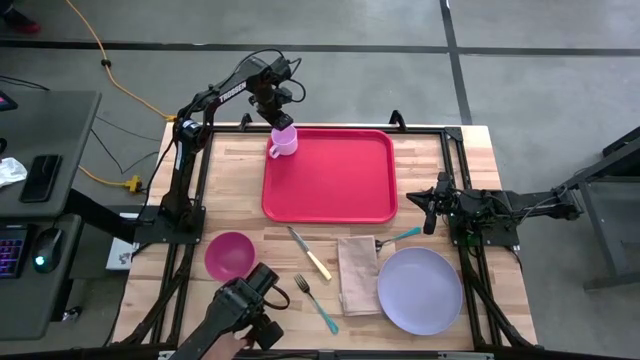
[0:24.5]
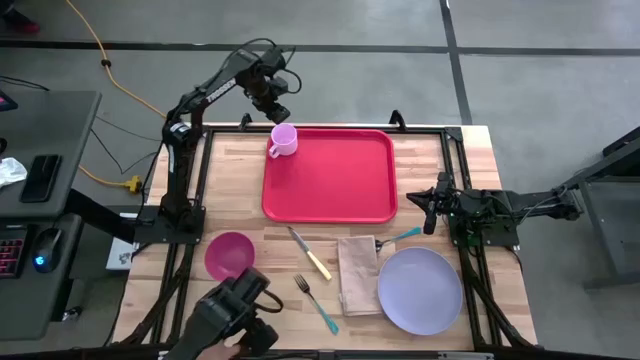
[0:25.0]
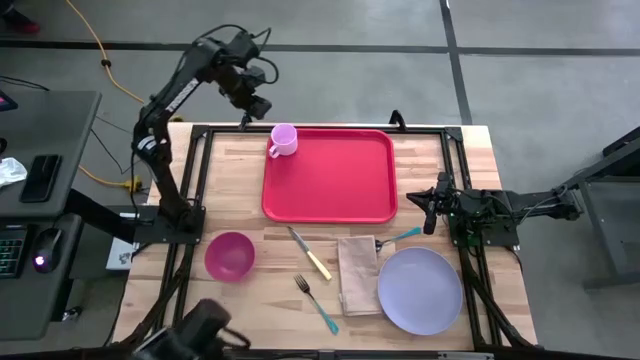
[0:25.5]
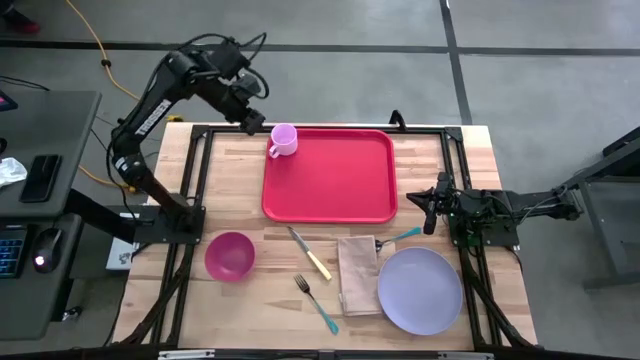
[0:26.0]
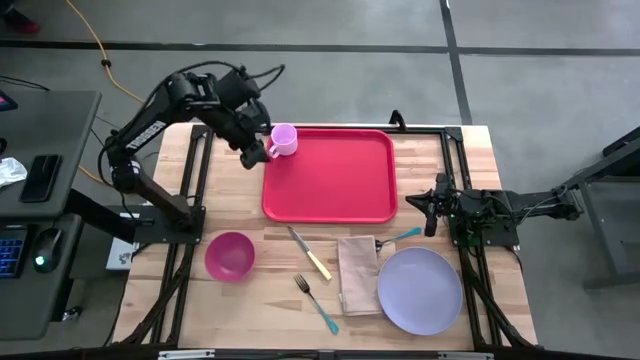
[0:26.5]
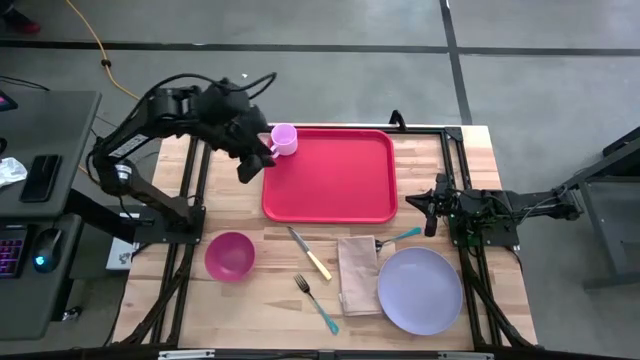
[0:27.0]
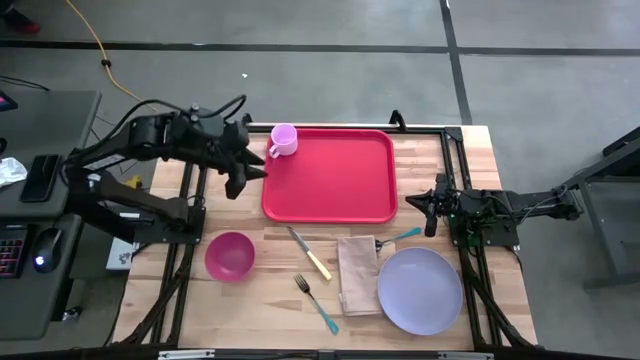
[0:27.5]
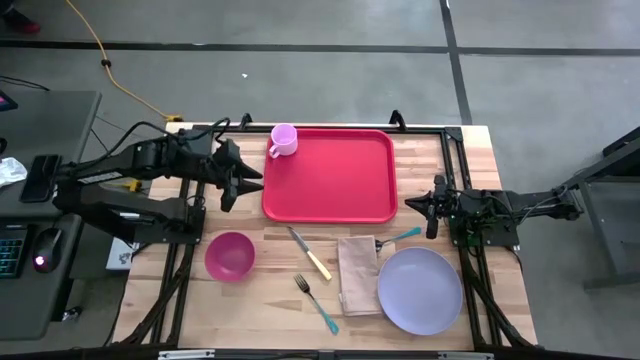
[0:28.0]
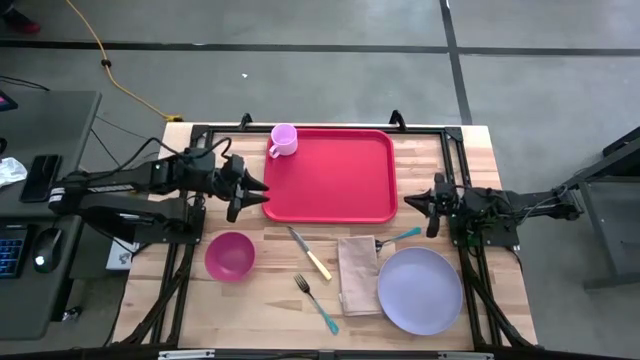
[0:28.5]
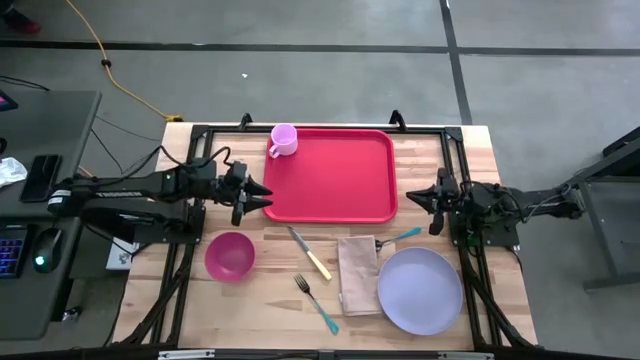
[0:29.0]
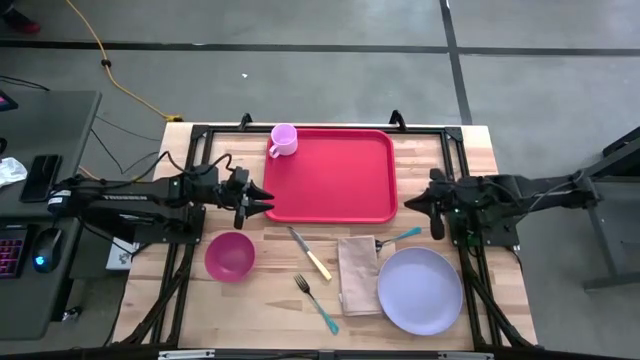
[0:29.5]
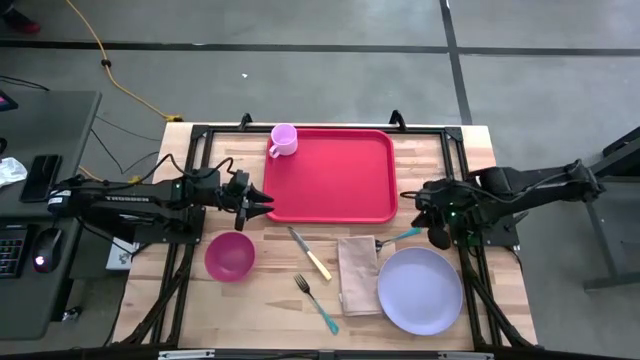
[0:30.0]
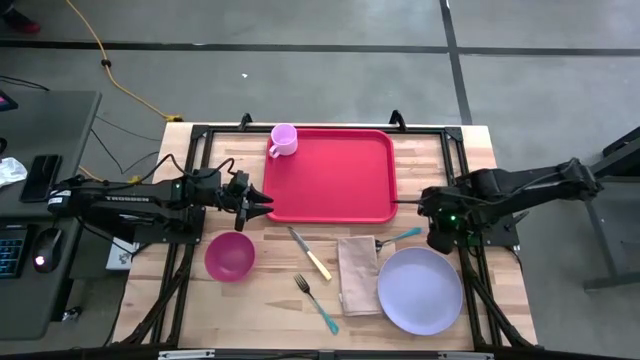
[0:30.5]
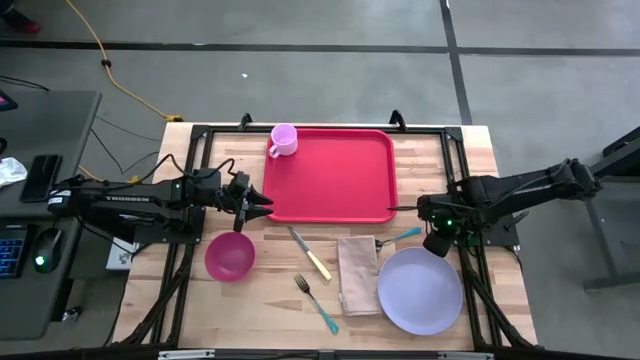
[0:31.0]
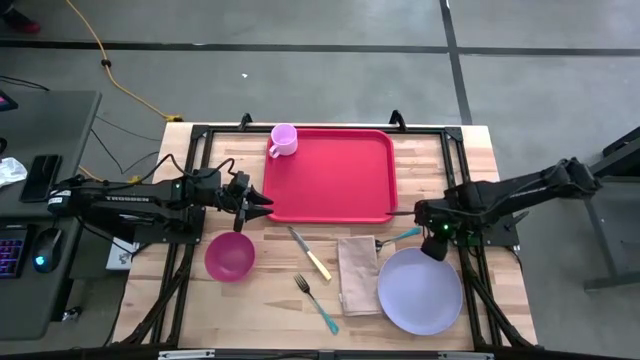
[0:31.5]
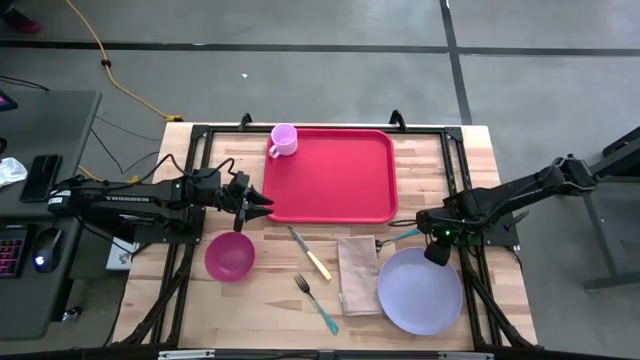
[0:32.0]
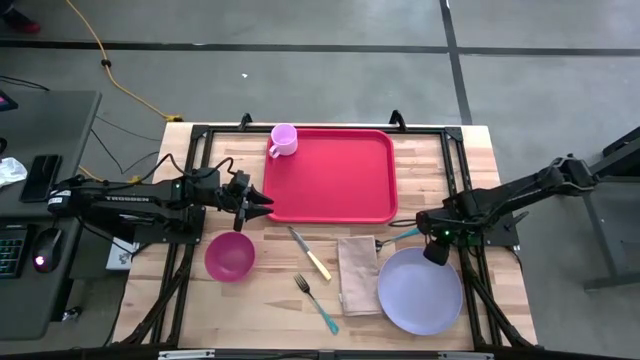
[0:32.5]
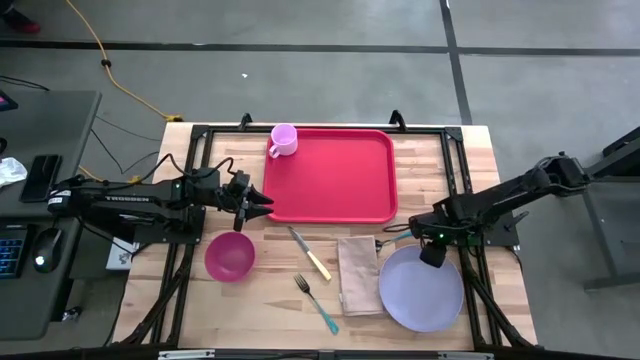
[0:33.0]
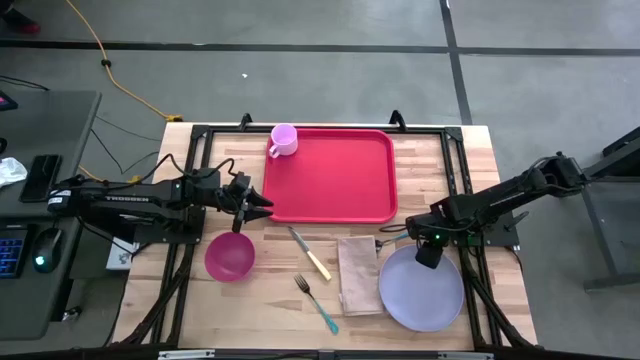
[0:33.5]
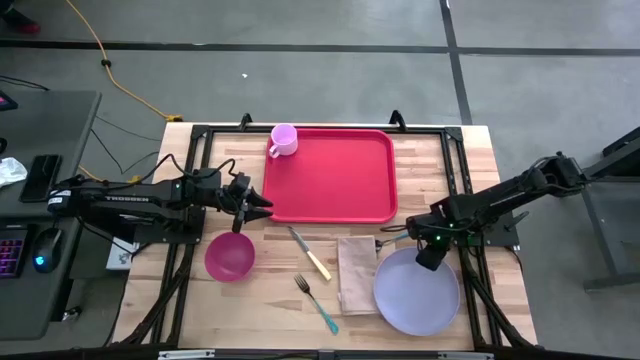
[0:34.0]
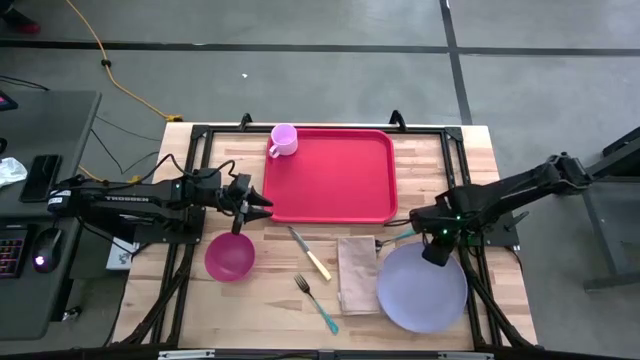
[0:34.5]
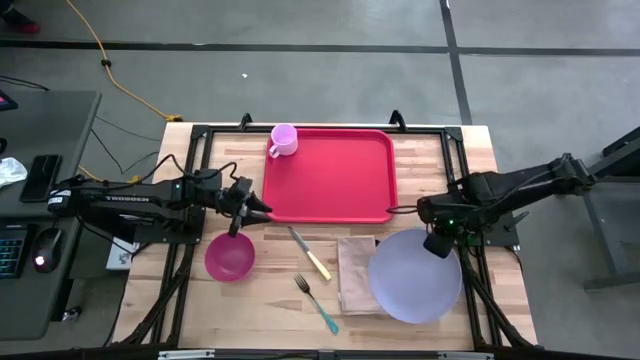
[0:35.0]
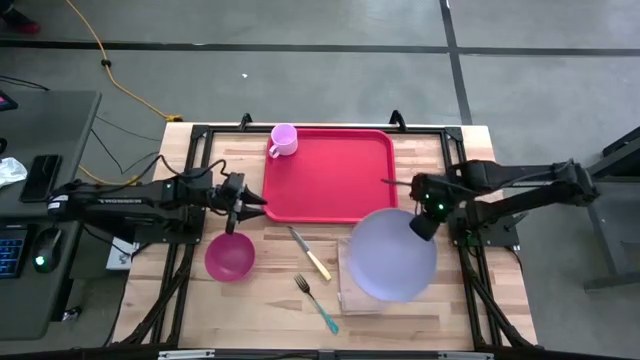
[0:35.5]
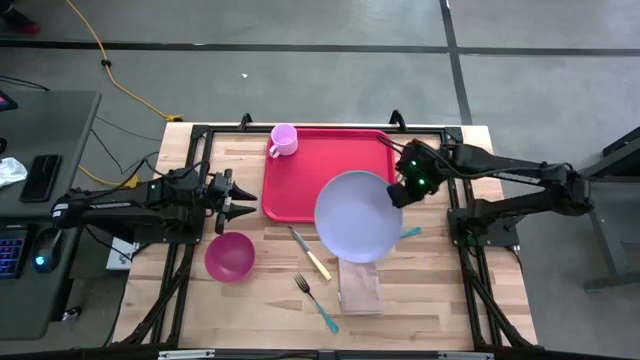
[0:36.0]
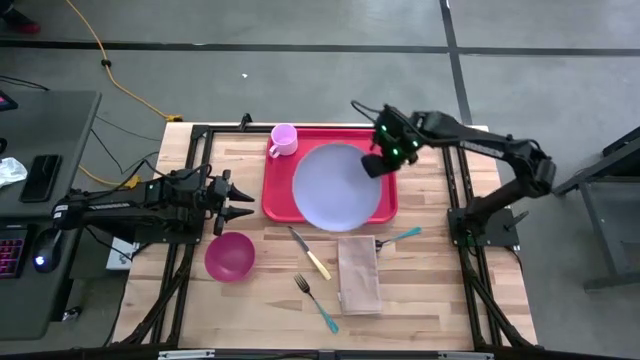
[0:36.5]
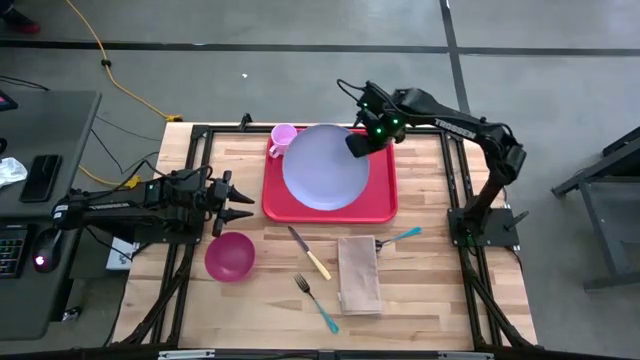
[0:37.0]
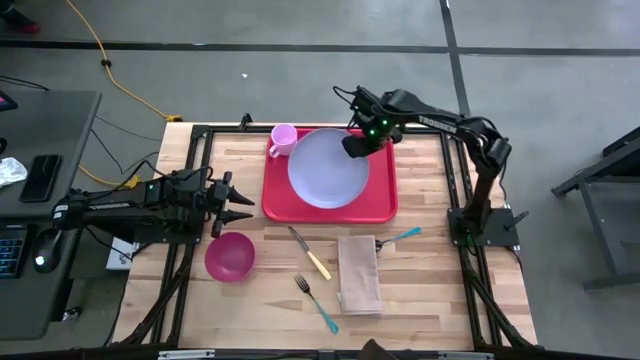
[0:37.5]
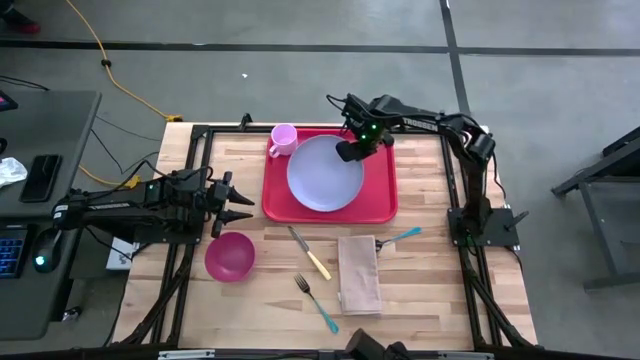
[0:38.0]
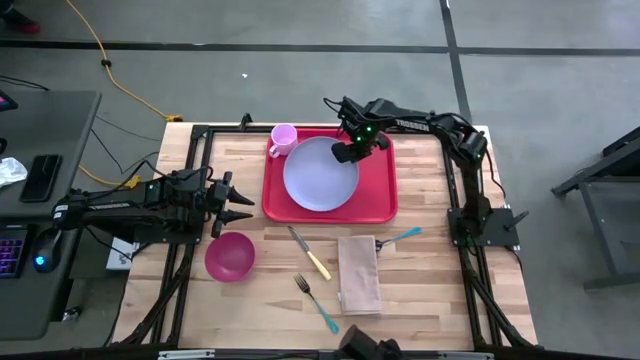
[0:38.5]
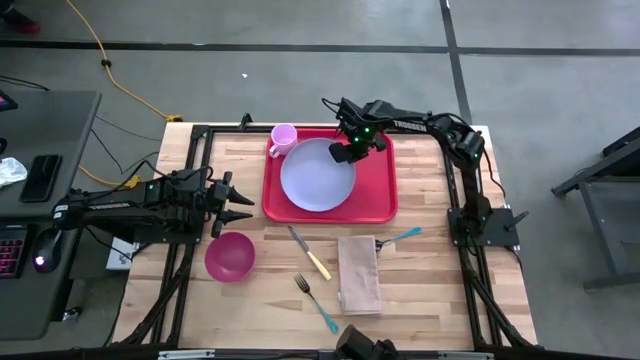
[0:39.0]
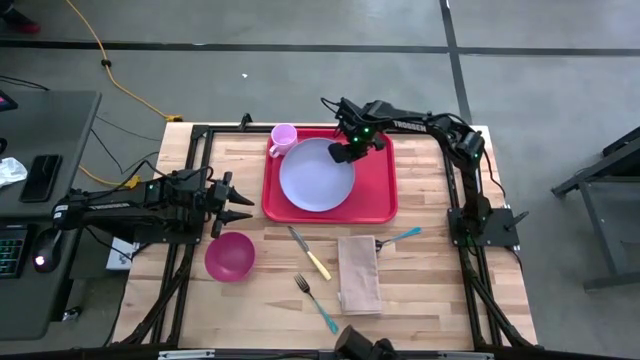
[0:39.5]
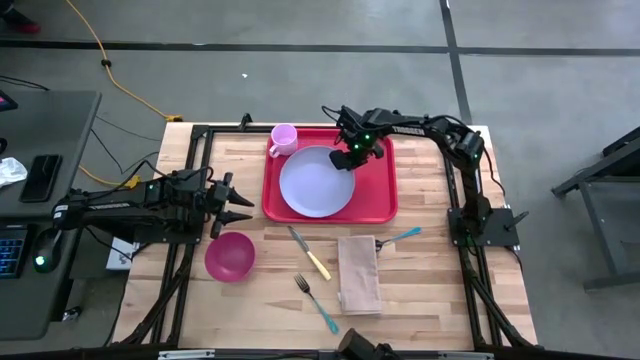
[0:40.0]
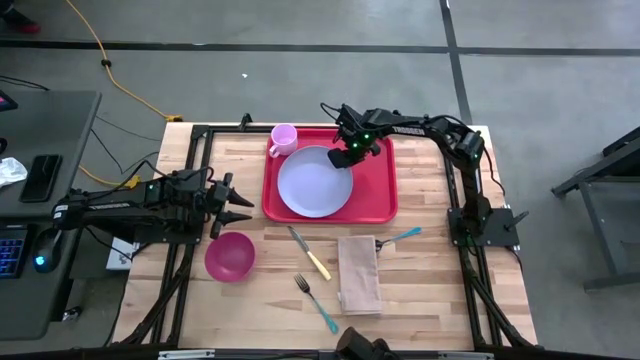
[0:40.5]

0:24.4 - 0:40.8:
Task: Set up tray
Put the light blue plate on the bottom left of the orange serving tray

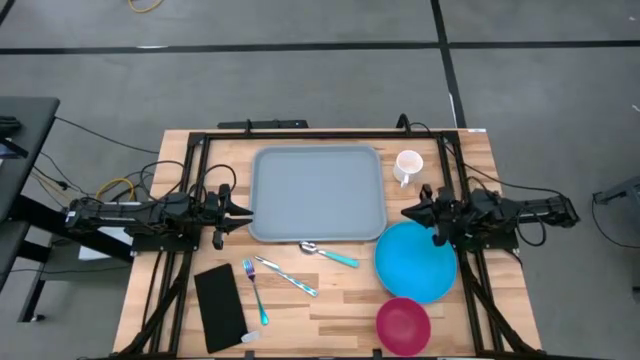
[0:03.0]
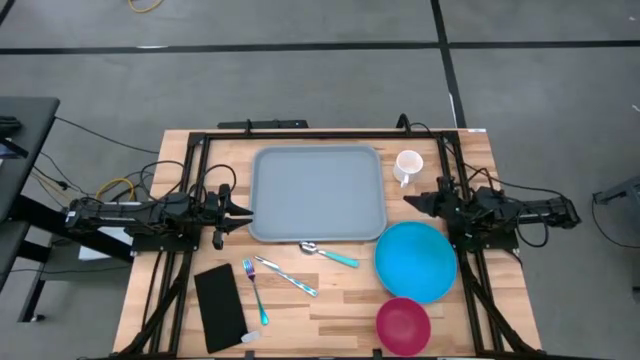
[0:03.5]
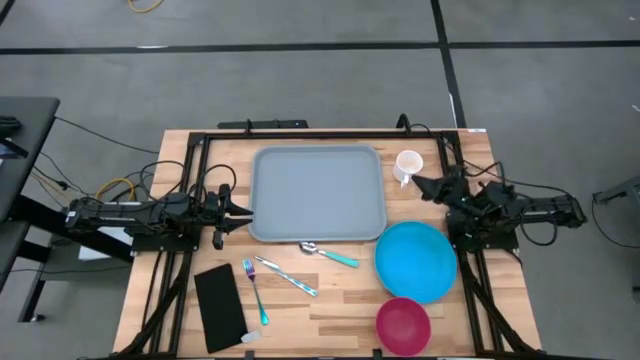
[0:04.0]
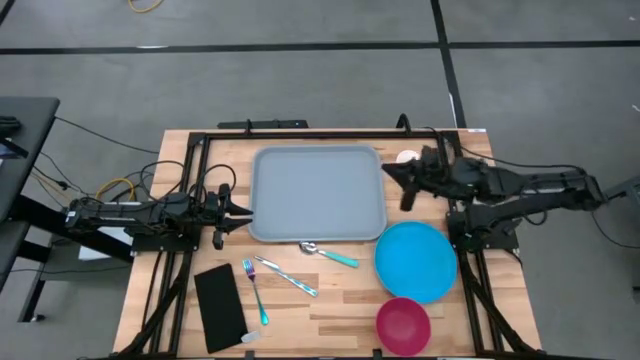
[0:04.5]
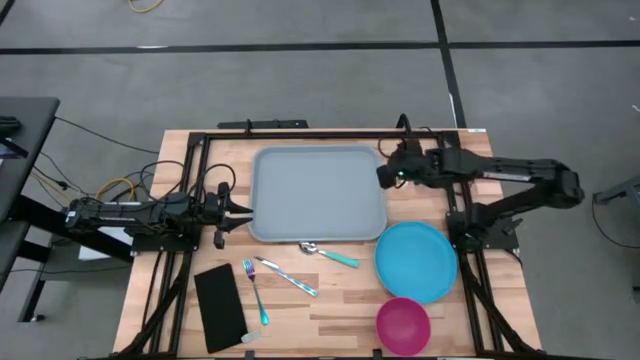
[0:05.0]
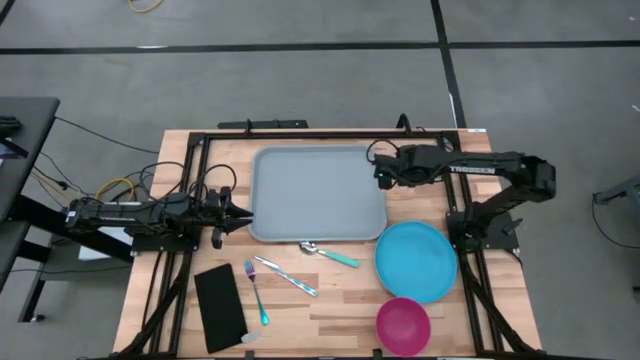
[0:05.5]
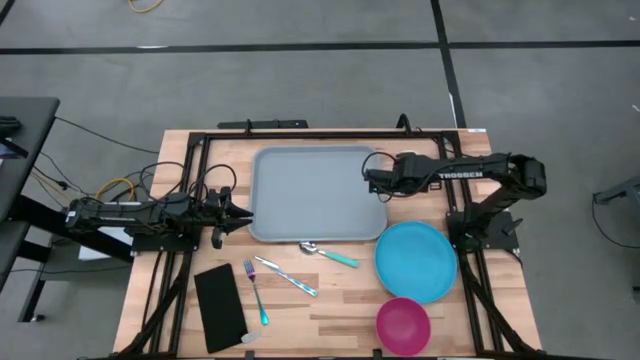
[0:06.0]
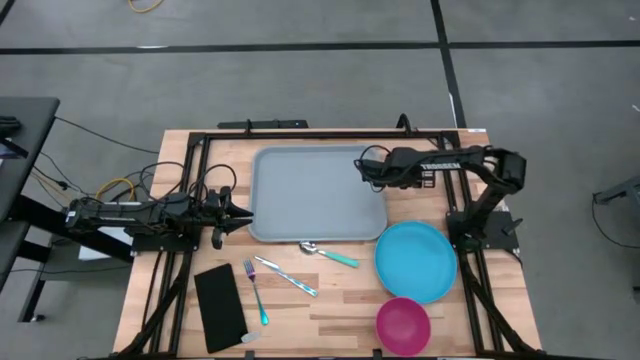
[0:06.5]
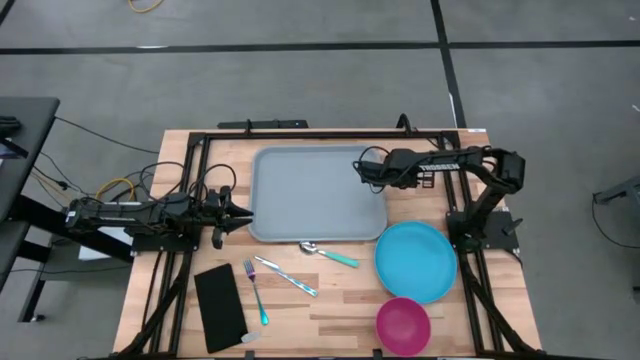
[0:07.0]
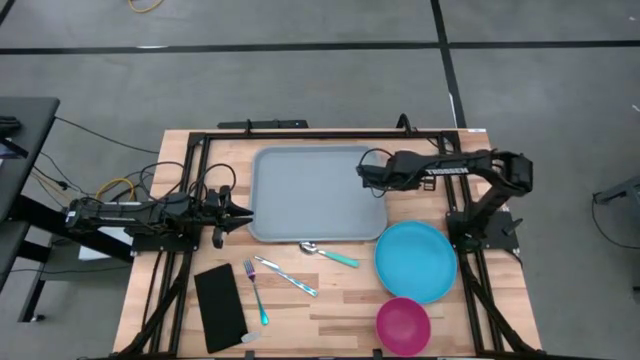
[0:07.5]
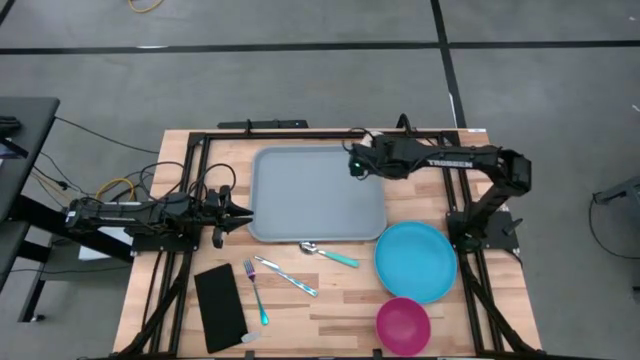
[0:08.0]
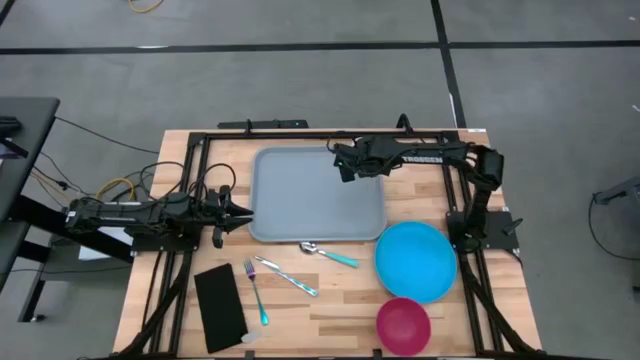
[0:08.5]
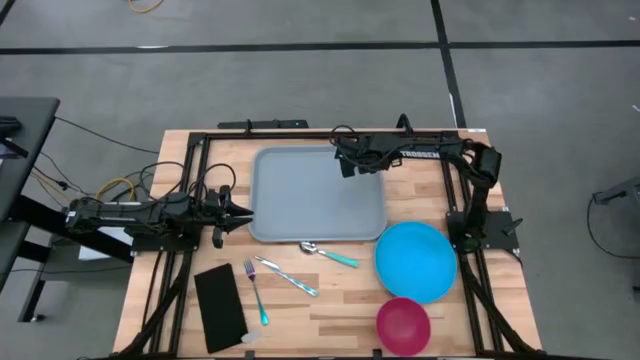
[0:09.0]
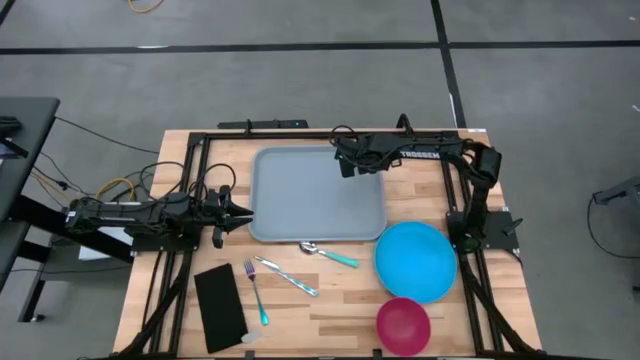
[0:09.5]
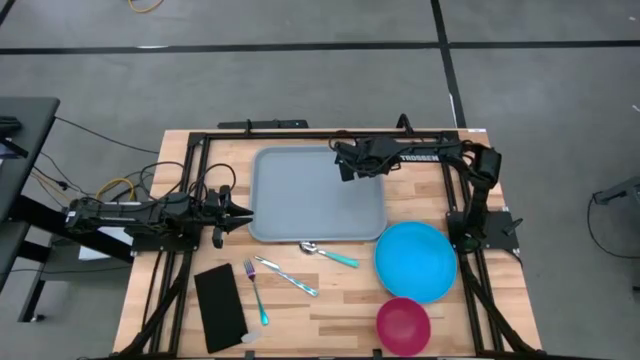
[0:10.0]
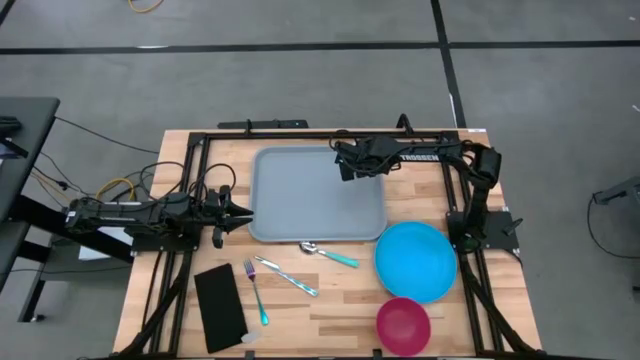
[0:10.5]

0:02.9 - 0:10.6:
Task: Set up tray
Put the white mug on the gray serving tray
